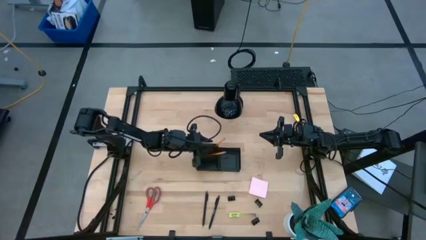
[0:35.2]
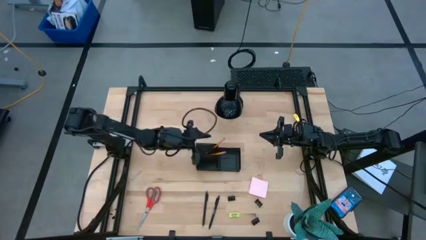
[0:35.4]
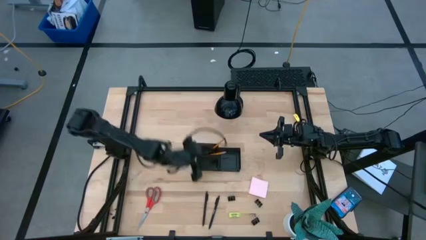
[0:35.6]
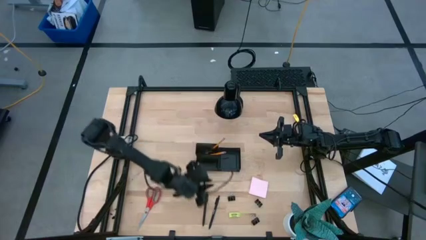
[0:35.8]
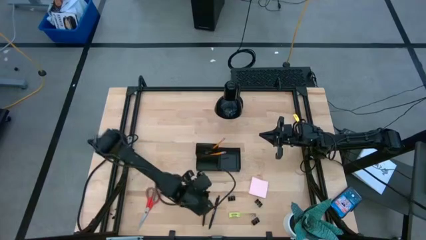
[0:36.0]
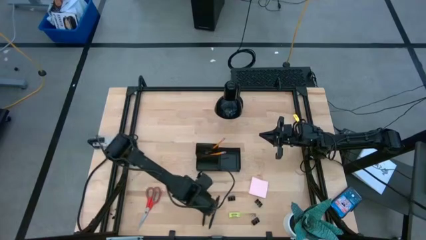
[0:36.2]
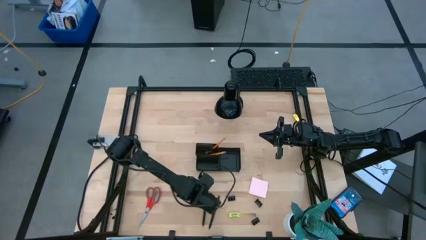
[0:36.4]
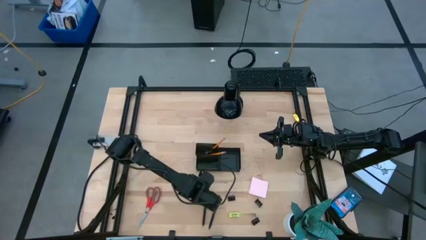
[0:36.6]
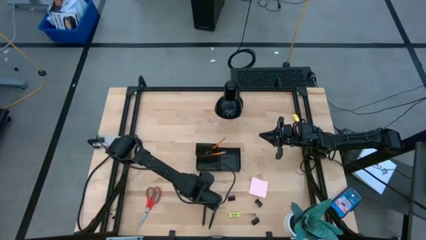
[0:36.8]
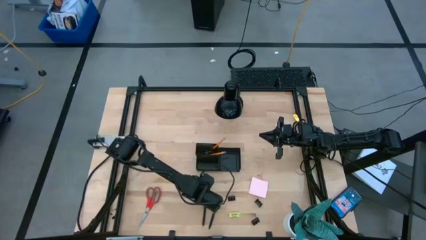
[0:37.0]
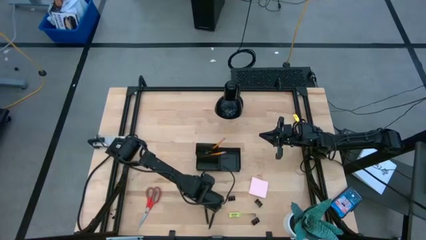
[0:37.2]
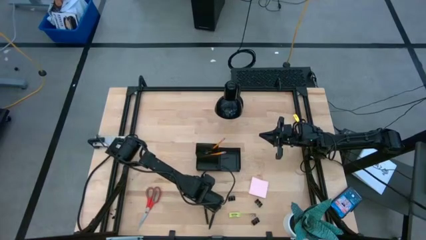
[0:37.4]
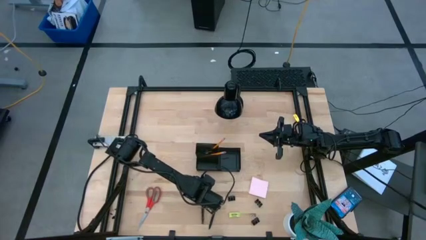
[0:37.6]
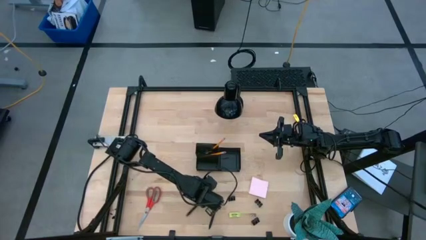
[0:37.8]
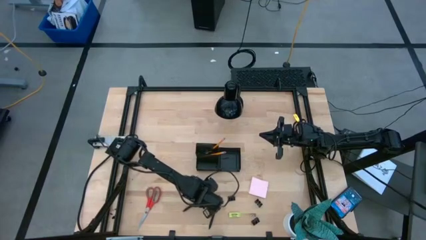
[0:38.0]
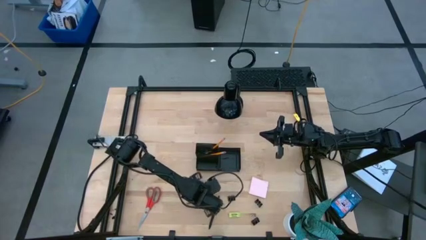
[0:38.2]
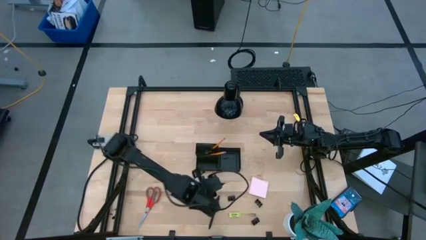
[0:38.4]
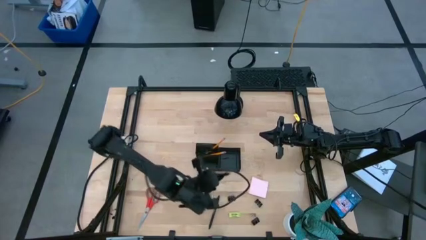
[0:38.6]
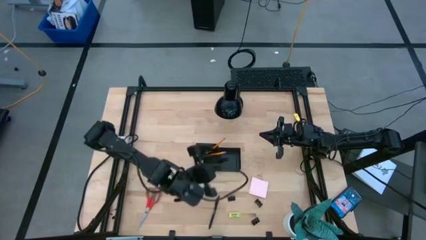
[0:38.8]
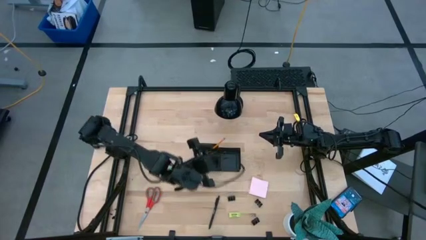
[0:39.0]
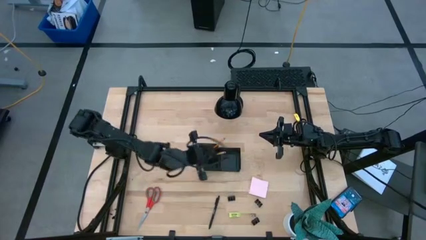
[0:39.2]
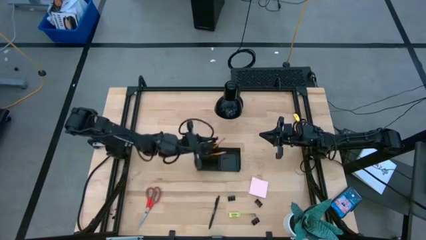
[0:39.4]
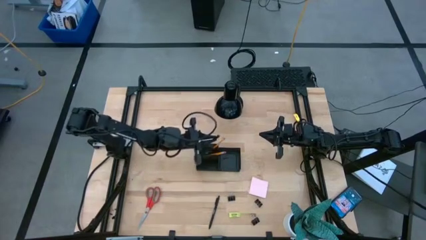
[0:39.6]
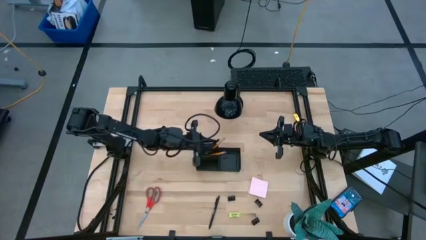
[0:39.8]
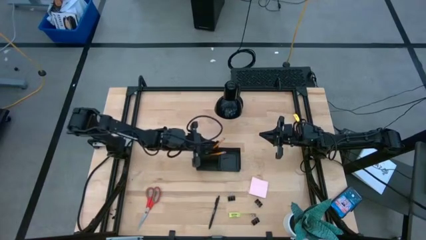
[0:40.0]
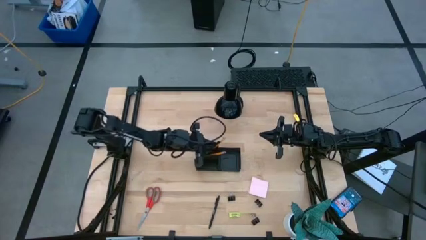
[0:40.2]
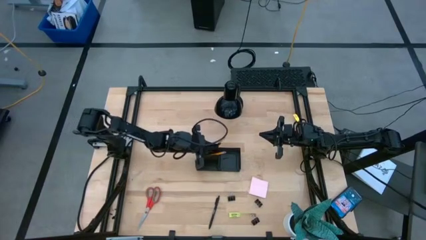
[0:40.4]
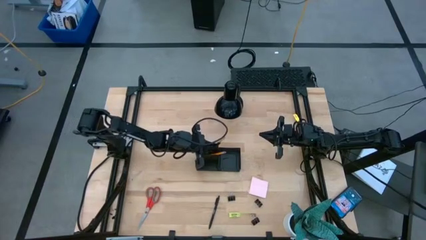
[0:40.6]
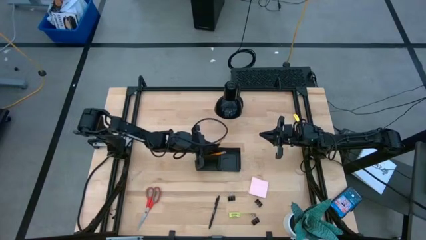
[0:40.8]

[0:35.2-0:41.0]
Task: Pick and place office supplies into organizer
Put the black pen into the black desk organizer

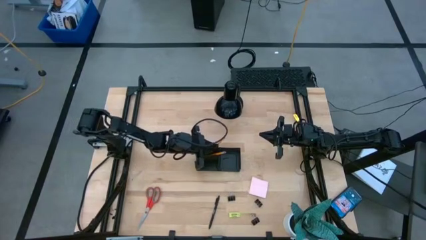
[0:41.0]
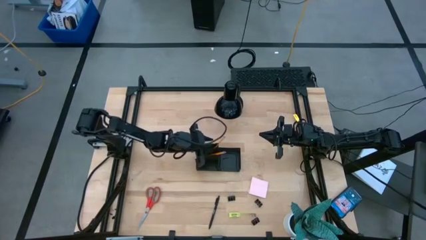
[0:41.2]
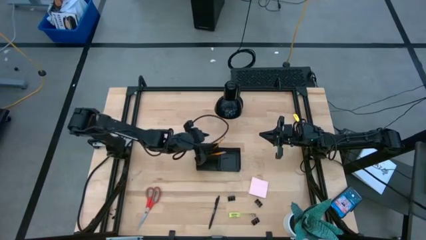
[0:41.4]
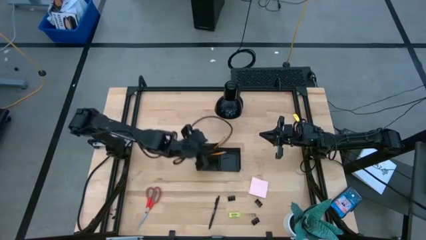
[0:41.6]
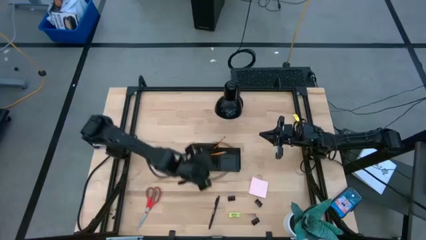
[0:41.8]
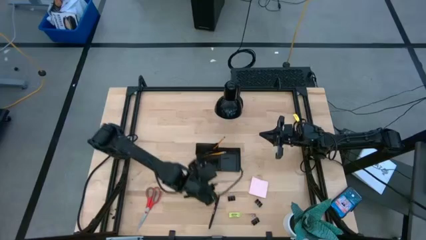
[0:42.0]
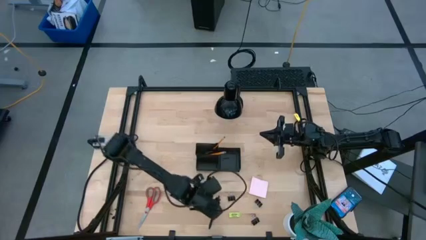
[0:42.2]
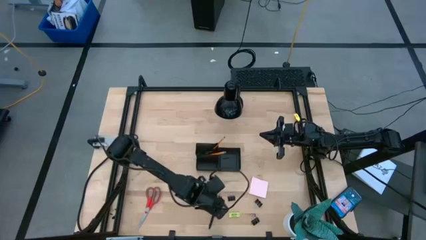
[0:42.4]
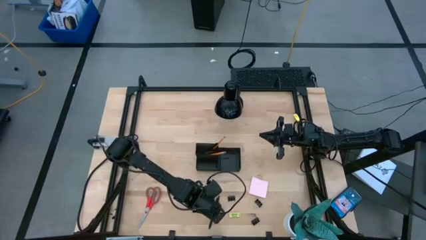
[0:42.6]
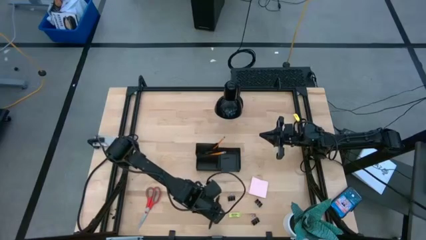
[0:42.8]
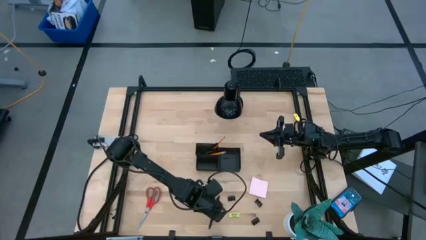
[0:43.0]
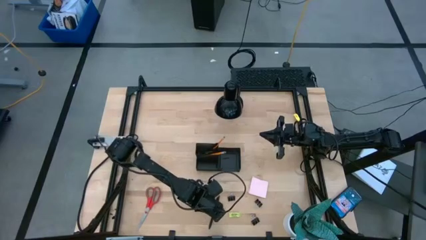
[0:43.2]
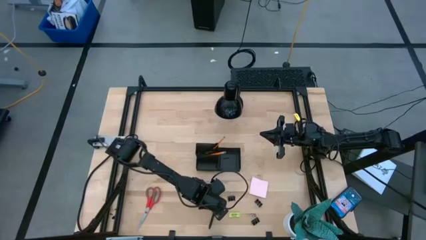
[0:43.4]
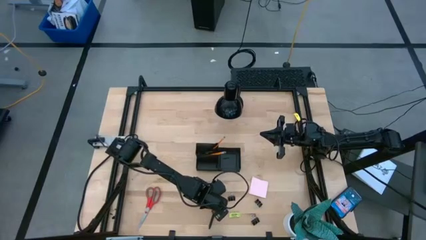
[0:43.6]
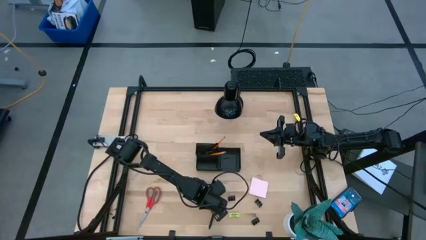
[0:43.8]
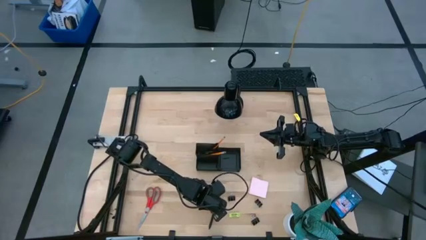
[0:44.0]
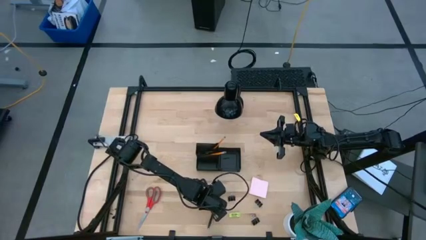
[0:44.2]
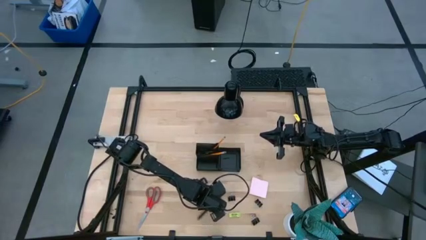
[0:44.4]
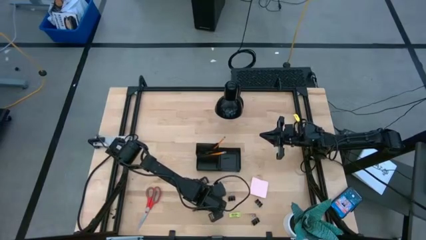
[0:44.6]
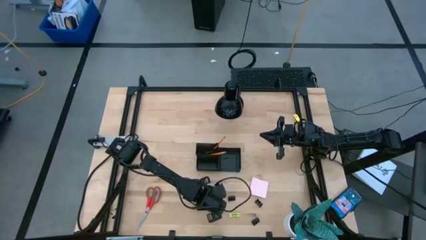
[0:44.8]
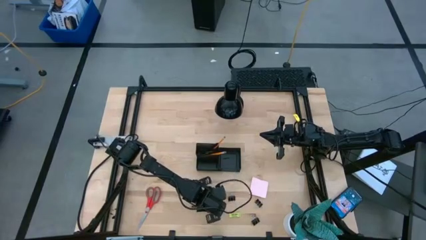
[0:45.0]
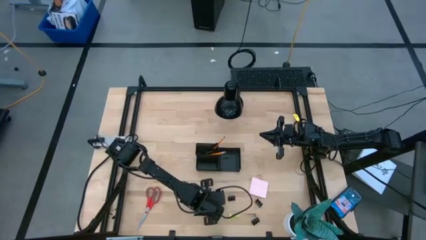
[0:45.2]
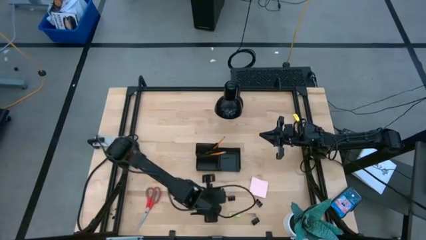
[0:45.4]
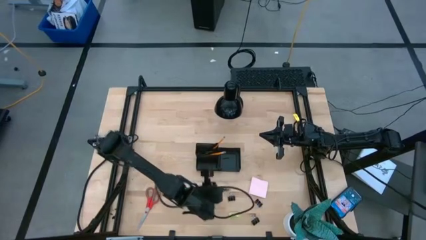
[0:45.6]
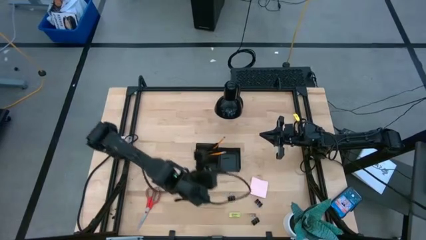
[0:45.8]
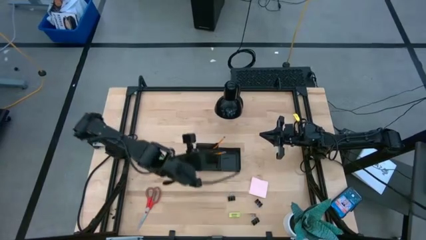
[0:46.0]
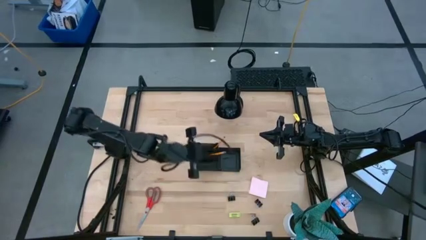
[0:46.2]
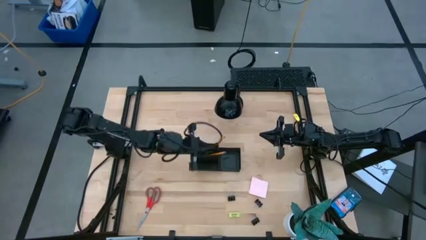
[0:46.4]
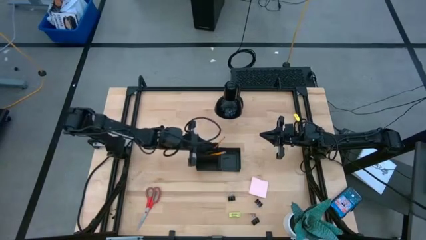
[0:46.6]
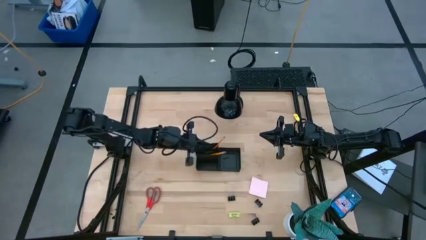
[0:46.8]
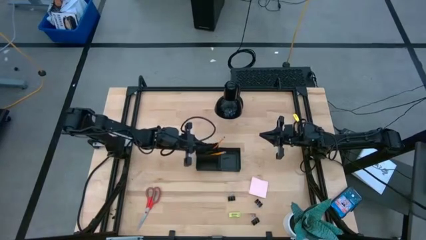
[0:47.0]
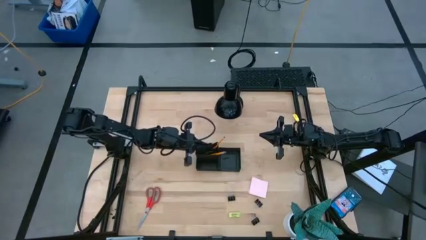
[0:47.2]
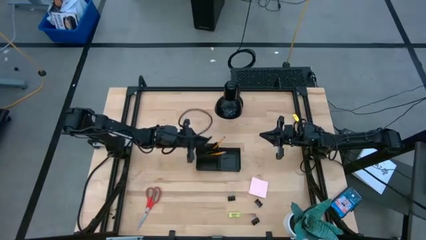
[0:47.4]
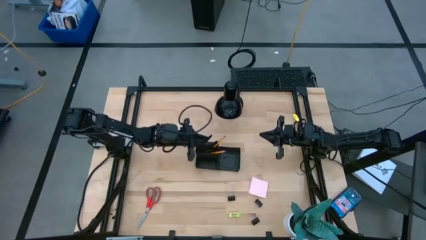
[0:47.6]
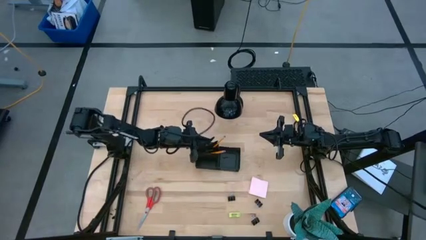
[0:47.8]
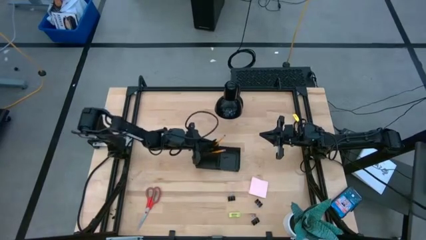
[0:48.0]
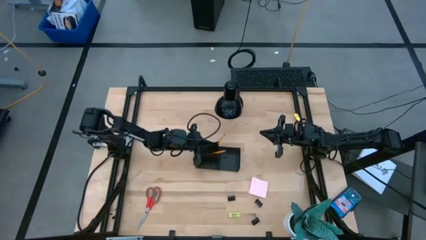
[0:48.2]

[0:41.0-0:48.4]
Put the black pen into black desk organizer

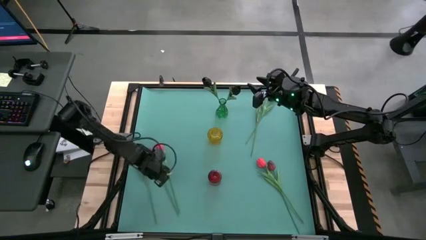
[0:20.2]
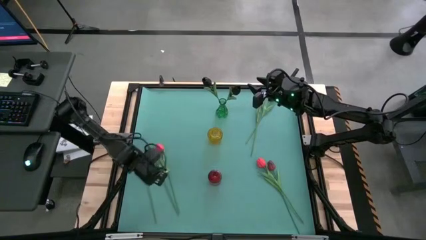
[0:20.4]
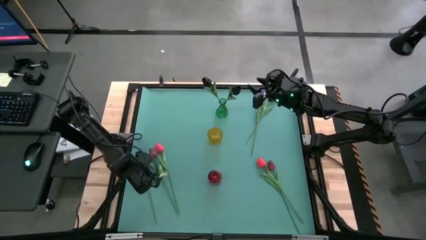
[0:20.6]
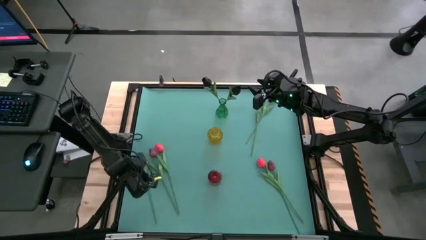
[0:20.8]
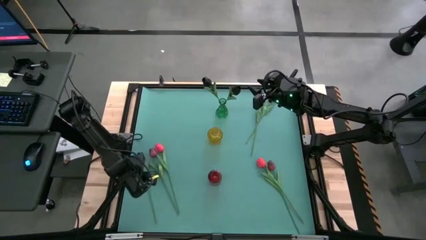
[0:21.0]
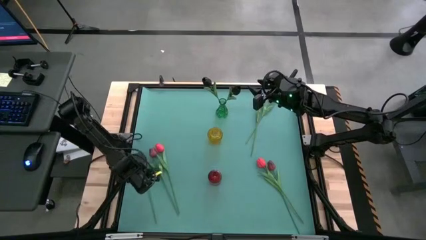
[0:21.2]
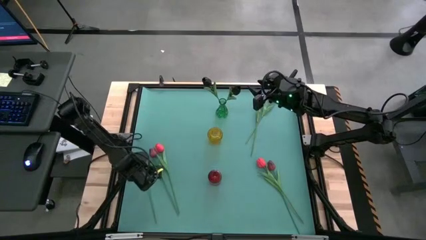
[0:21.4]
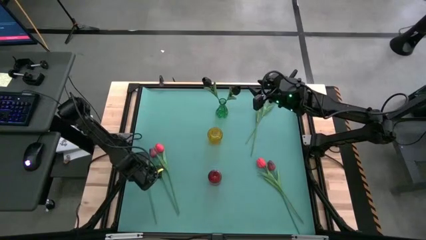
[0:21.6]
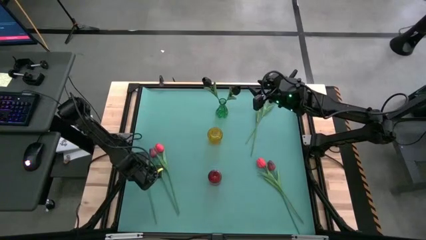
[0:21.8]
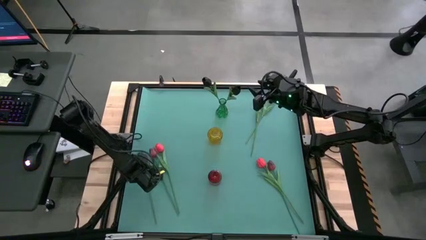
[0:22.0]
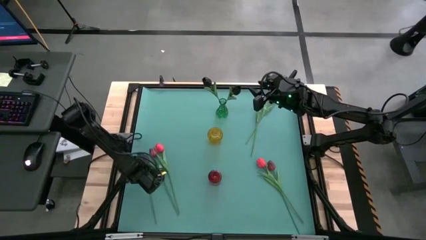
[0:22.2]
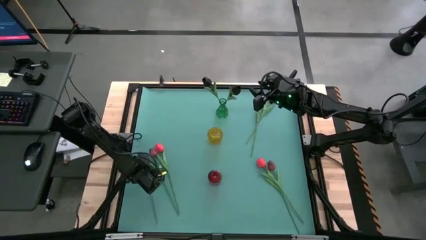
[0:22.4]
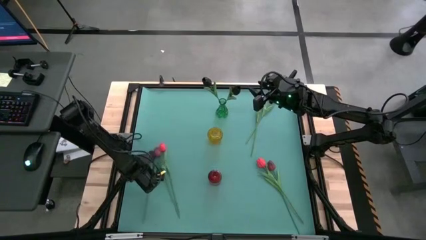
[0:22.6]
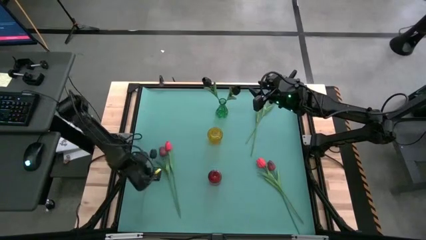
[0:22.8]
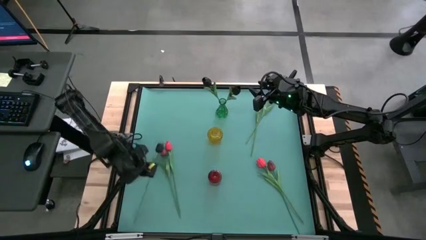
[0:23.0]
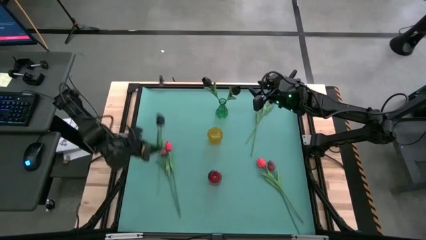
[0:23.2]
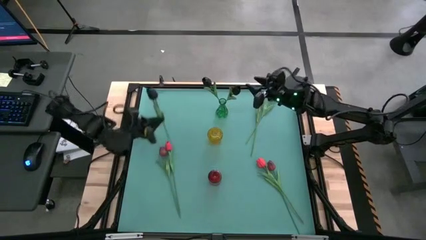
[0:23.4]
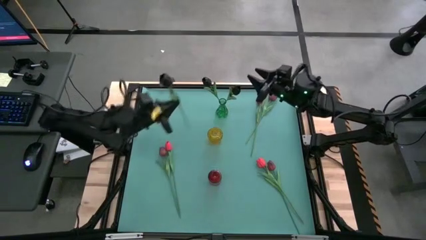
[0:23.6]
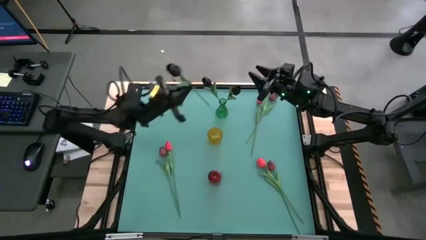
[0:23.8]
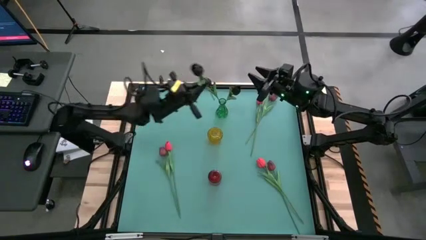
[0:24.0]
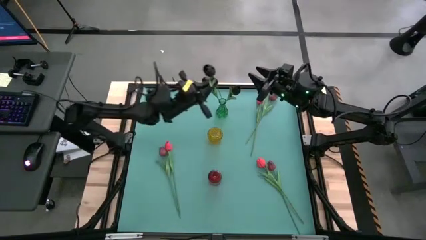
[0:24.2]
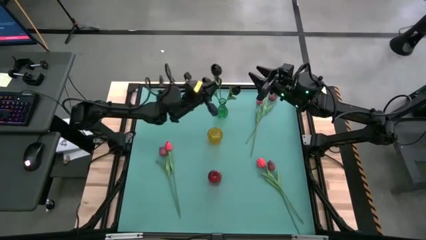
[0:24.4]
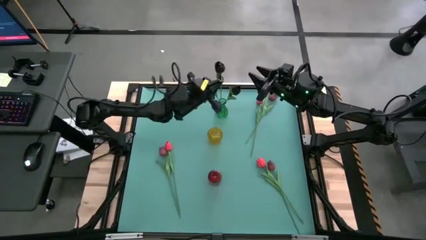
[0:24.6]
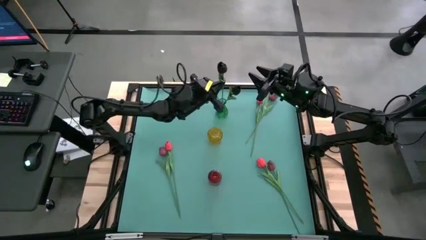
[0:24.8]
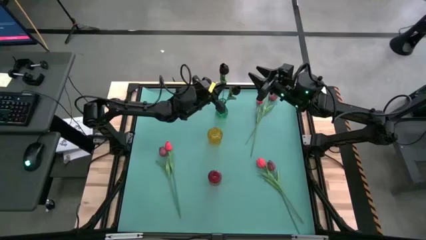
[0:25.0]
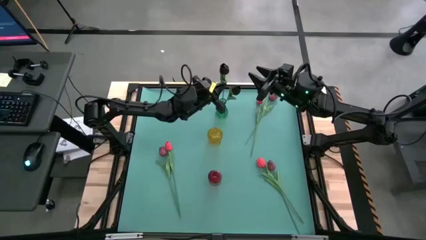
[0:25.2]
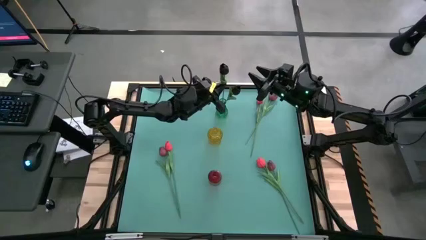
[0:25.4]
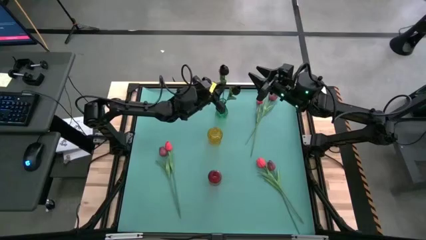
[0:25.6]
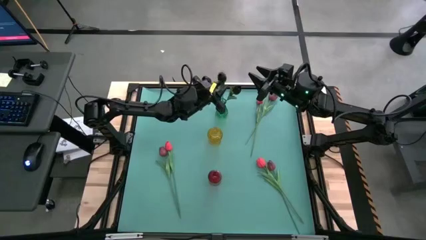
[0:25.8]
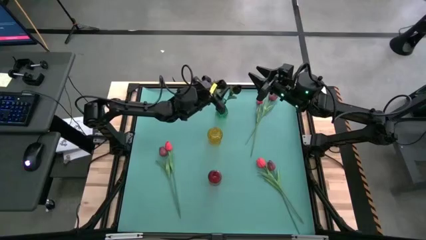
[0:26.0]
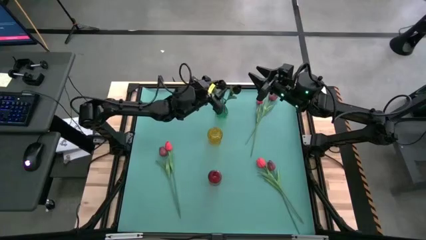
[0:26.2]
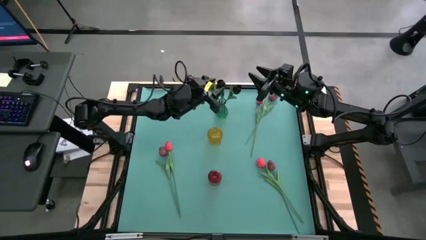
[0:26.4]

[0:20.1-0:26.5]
Task: Sort flowers into vase by color
Put the black tulip into the green vase
